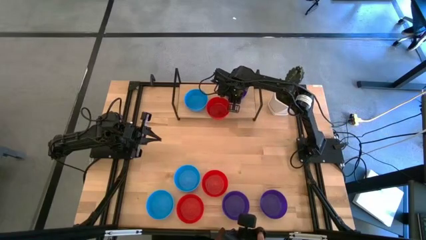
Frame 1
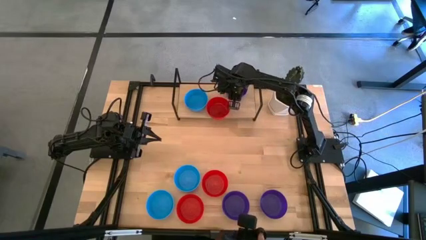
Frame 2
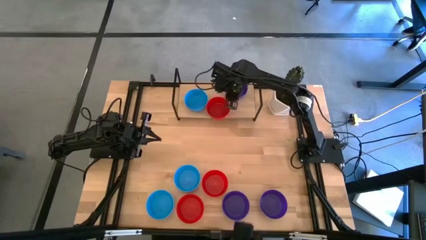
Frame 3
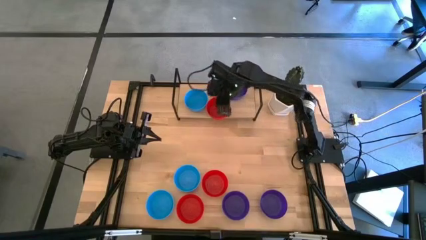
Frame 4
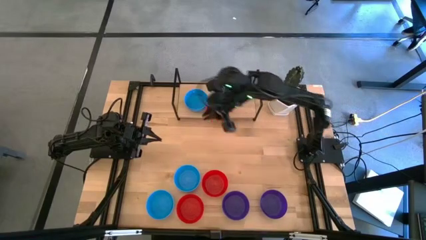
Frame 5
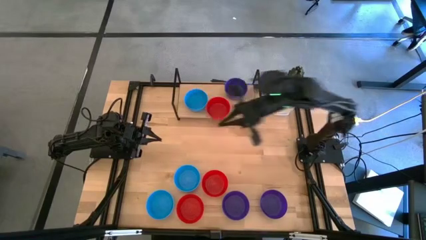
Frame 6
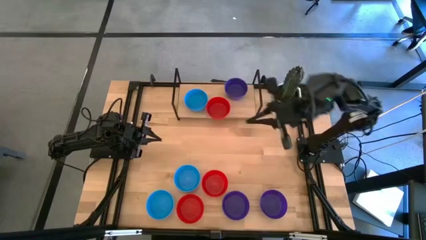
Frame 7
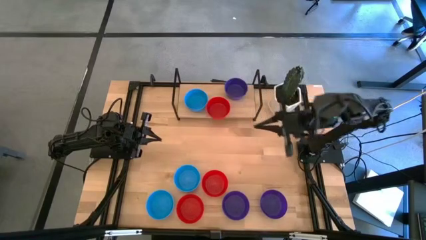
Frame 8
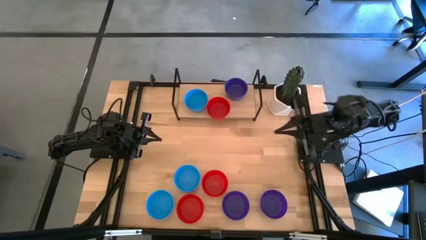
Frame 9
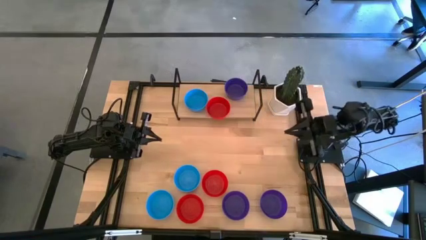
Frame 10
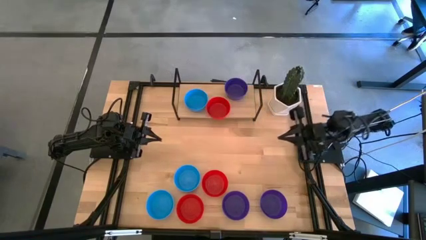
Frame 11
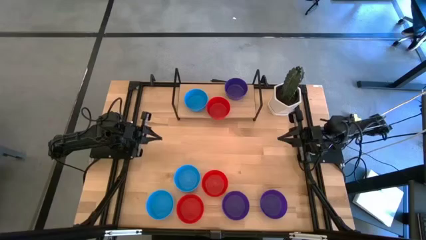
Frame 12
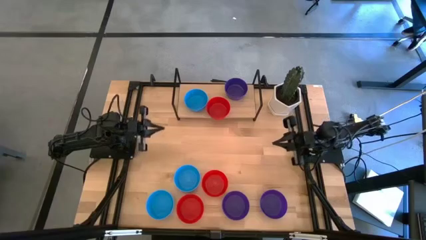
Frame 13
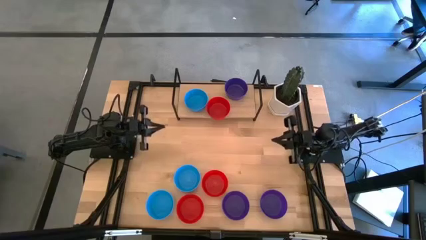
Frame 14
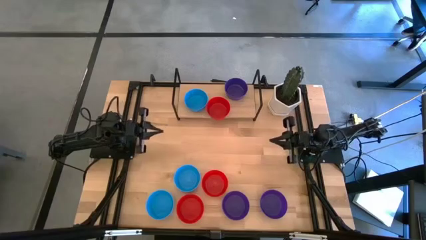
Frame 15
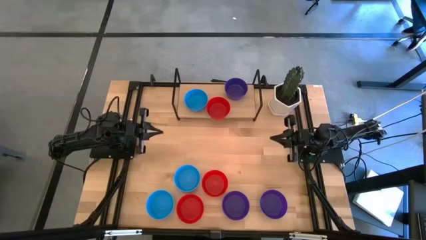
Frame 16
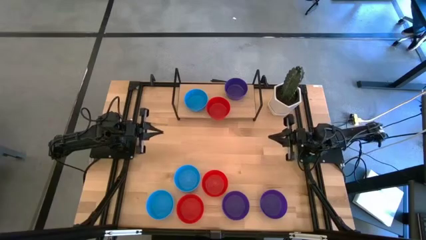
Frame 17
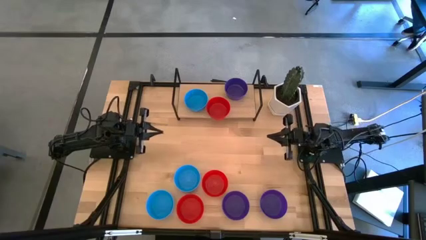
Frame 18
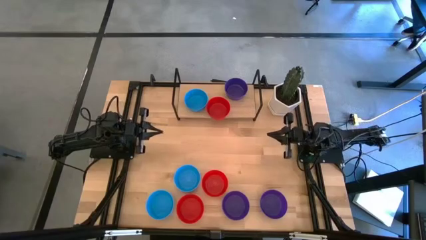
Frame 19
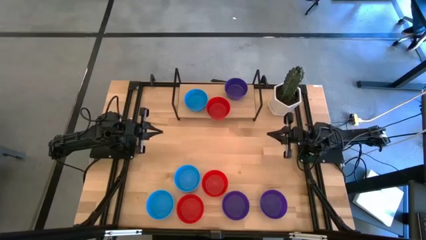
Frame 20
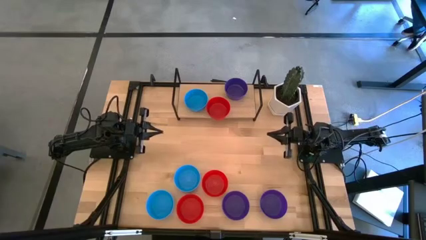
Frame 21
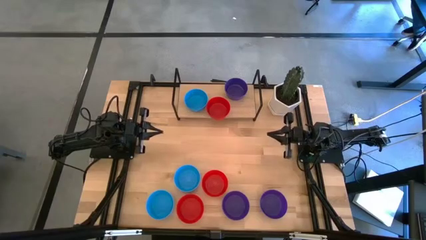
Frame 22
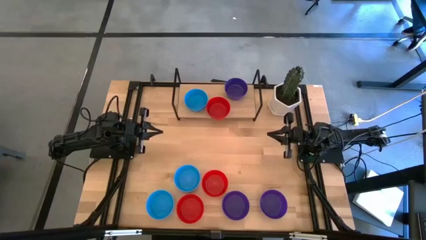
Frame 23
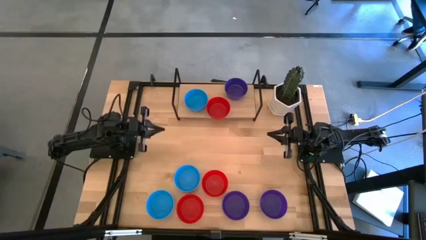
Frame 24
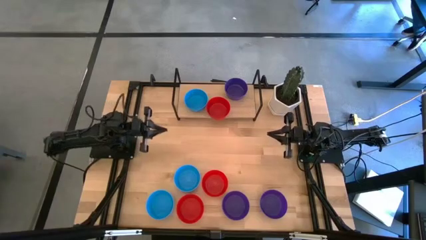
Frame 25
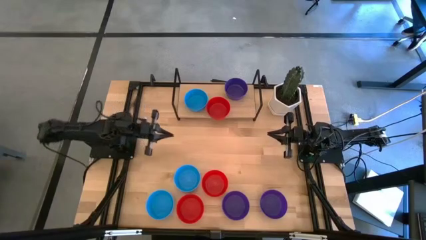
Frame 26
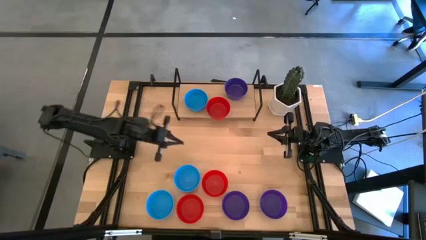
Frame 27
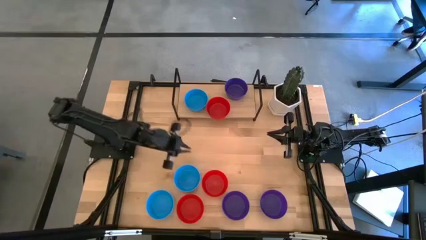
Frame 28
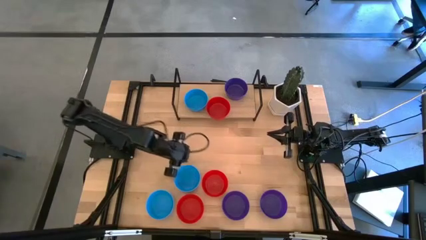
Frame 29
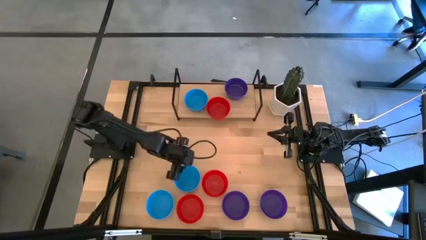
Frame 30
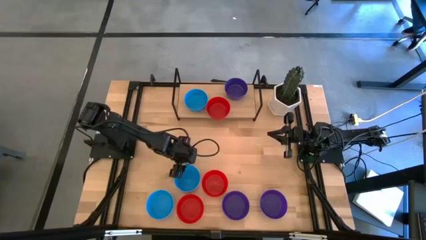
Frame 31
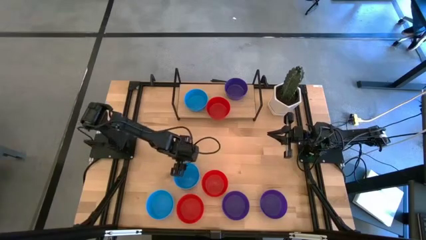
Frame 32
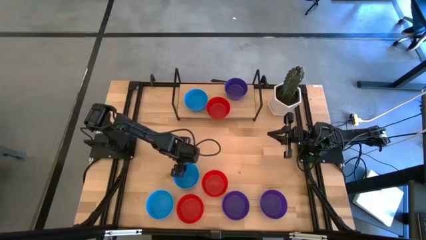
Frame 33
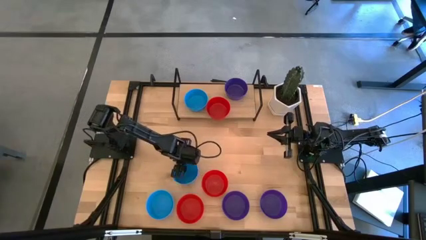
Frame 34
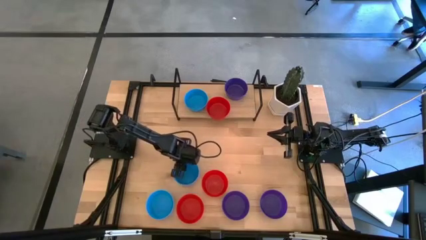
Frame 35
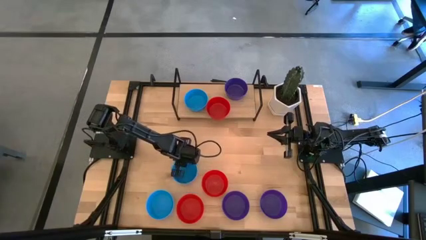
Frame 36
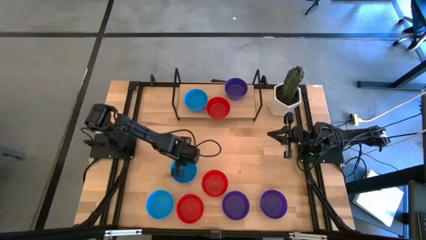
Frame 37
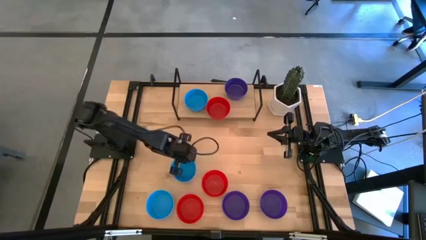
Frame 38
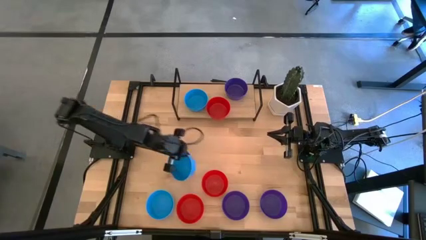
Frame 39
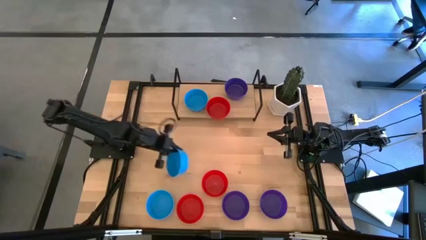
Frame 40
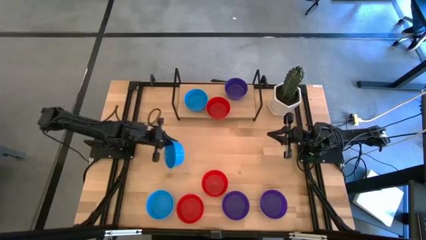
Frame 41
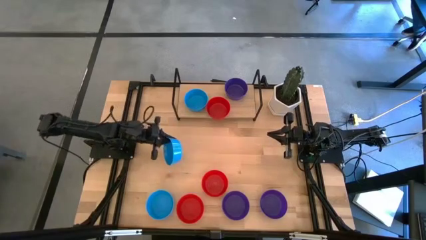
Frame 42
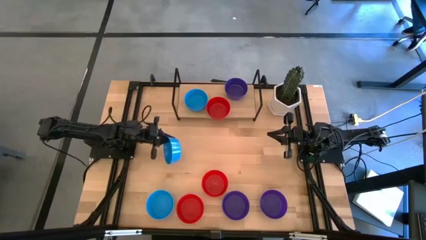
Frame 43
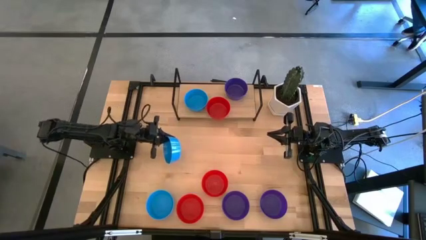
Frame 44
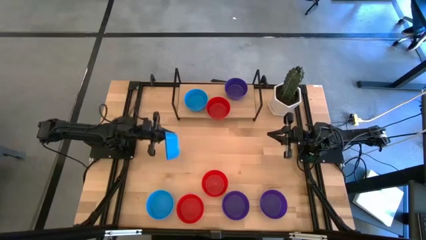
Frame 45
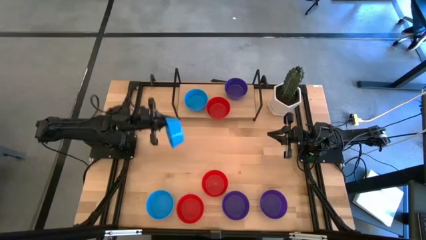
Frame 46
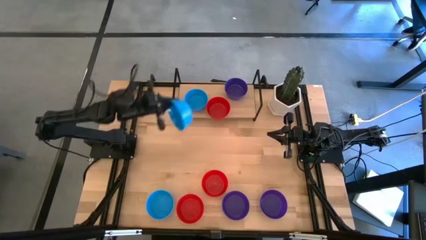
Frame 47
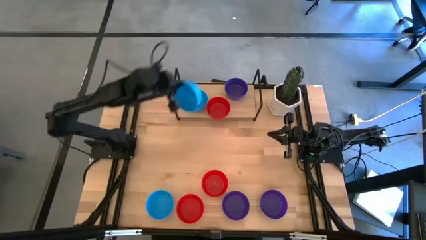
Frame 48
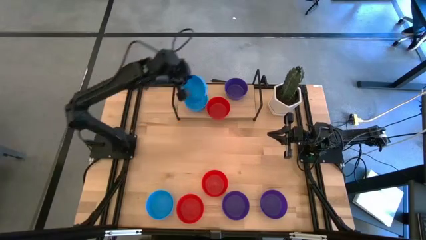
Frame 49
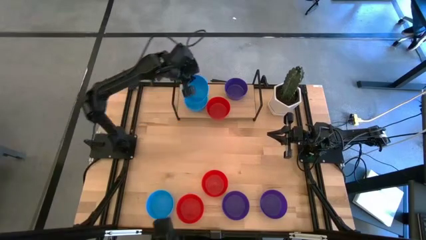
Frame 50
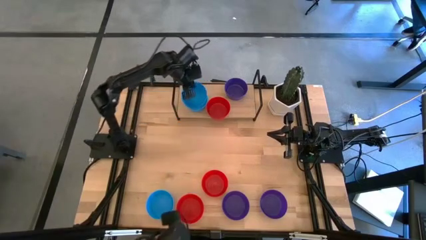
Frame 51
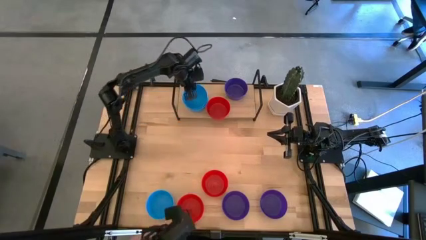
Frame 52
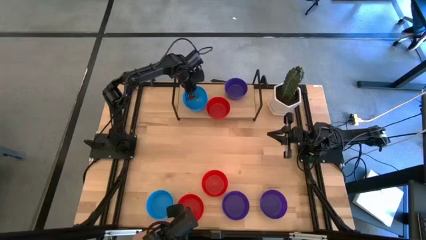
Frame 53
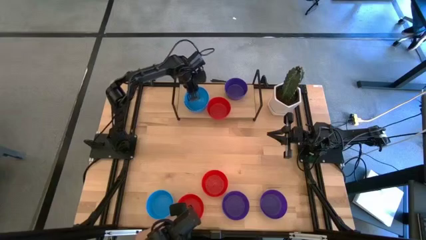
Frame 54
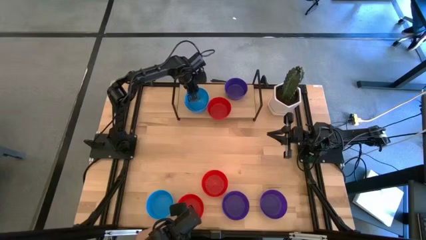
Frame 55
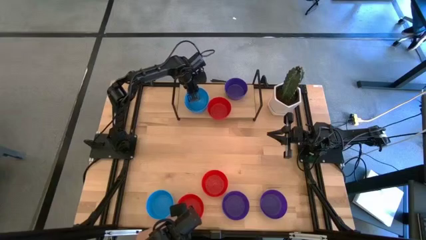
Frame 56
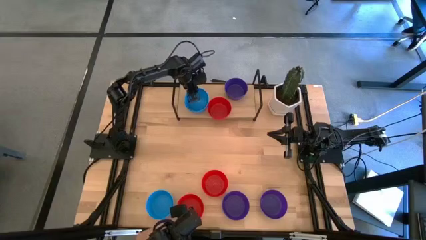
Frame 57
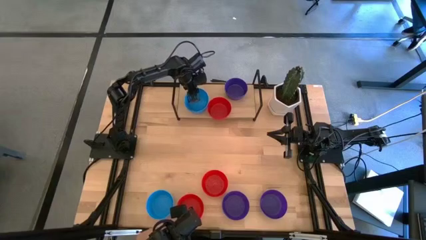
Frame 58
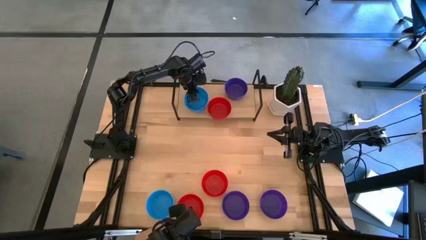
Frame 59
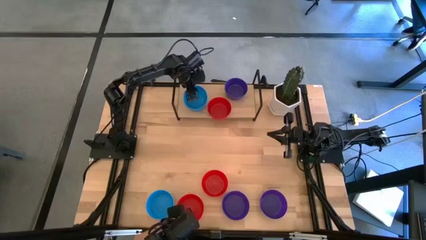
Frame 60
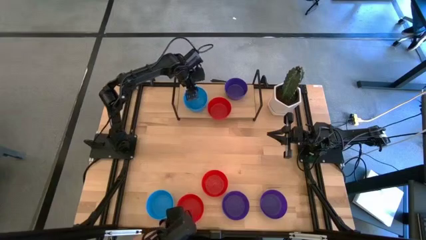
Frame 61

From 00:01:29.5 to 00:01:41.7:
Task: Pick & Place Mini bowls
Stack the blue bowl on the blue bowl on the shelf
